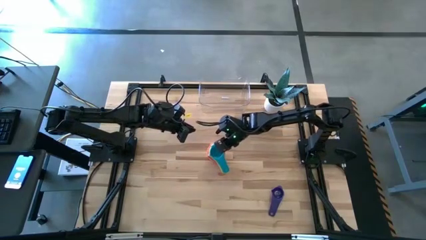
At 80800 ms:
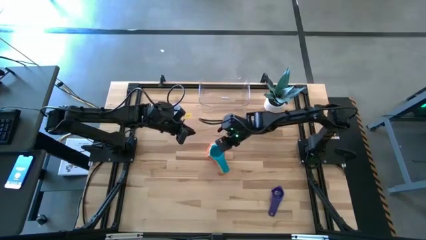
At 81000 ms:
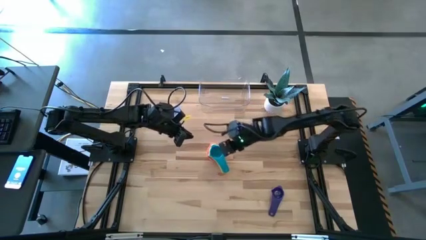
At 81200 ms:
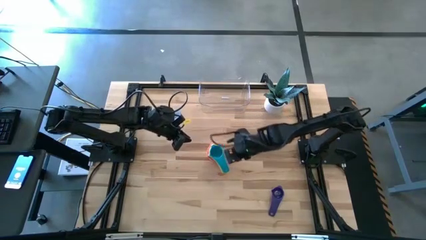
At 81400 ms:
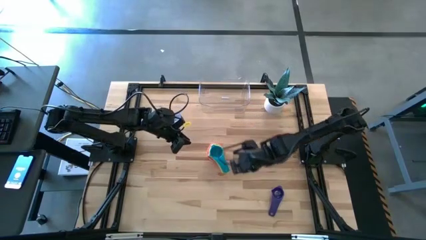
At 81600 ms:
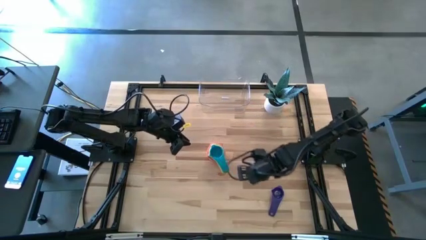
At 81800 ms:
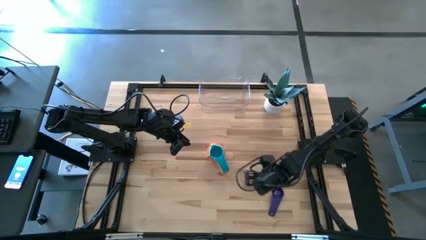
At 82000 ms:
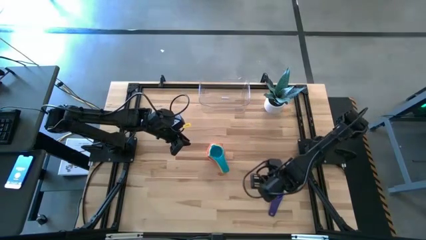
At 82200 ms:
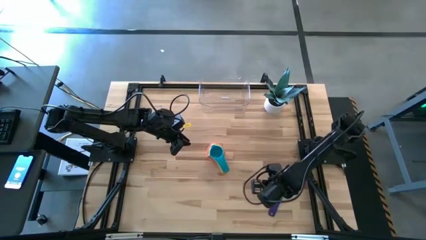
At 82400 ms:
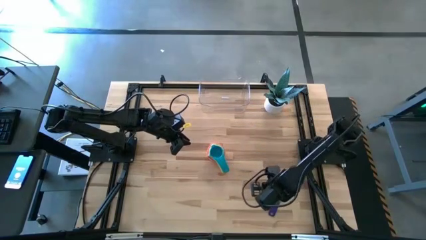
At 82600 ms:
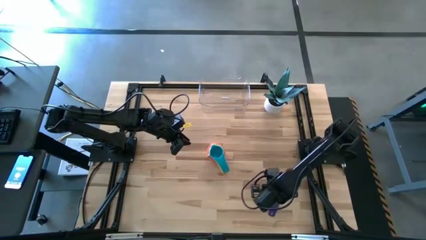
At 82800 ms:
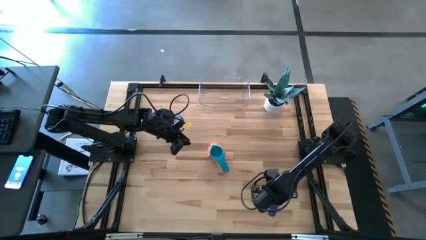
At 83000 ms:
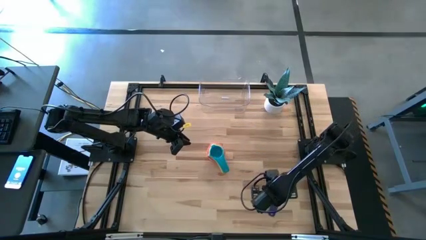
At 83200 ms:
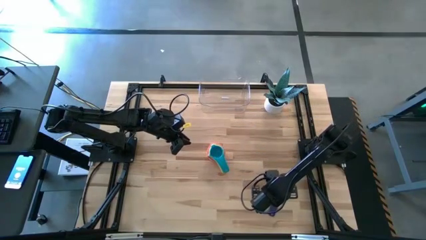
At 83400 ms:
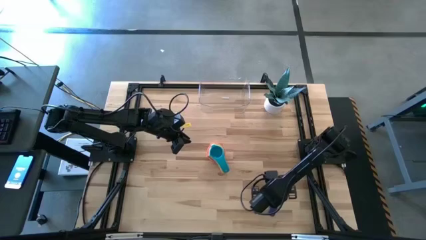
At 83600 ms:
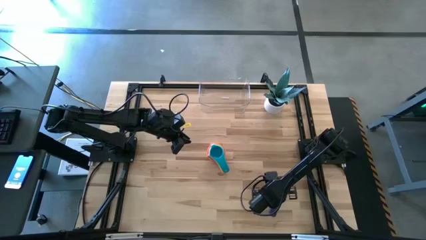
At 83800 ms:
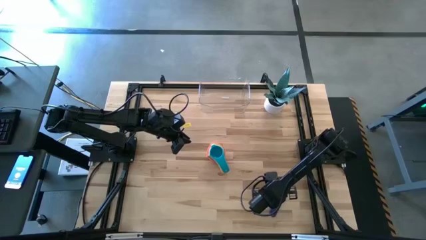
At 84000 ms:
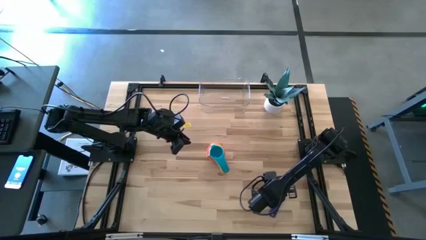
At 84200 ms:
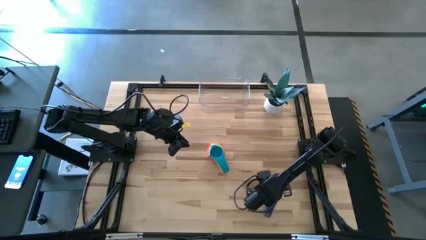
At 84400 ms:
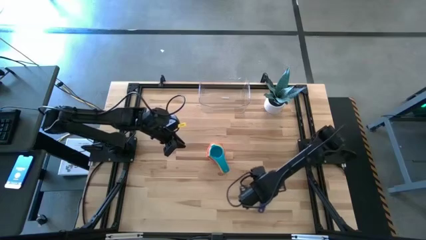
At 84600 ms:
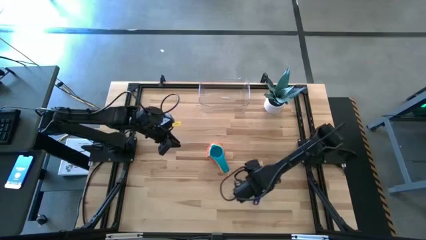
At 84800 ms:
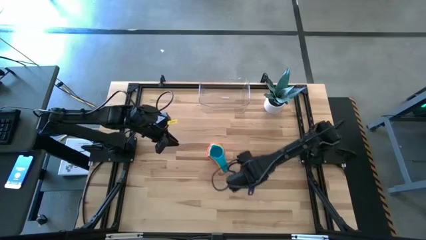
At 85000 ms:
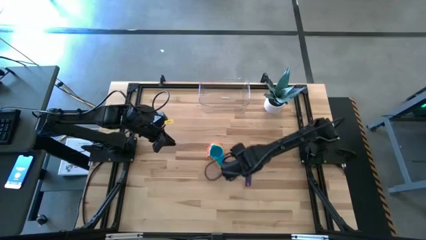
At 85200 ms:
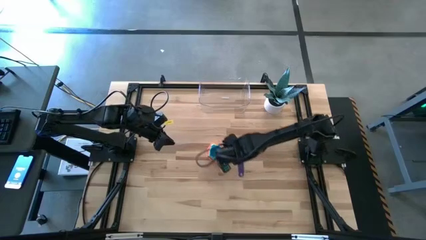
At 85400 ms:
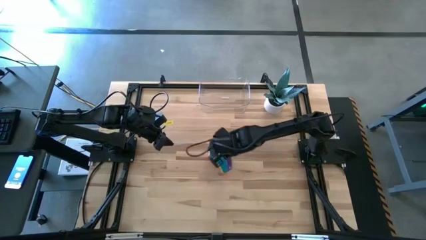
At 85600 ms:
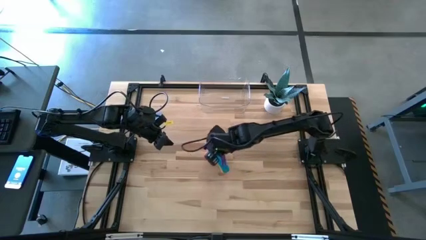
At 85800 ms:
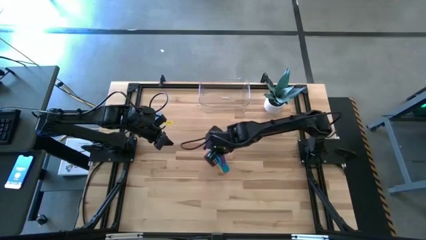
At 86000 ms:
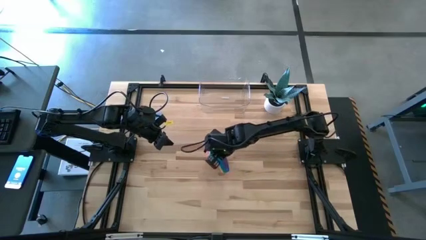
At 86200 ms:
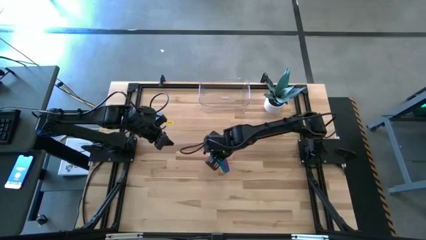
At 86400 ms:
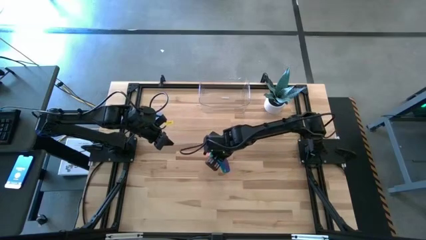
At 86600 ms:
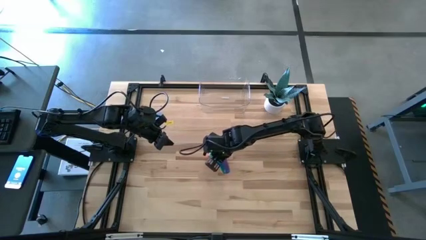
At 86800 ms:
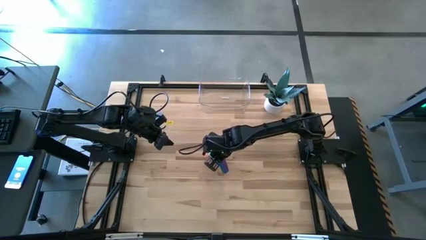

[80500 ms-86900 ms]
Task: Nest measuring cups in basket
Stack the purple measuring on the top of the light blue measuring cup

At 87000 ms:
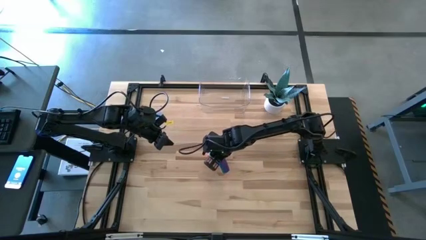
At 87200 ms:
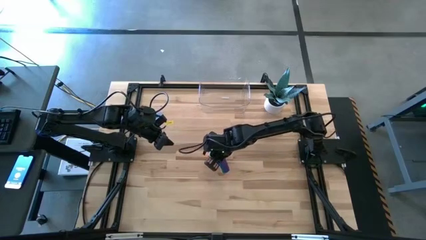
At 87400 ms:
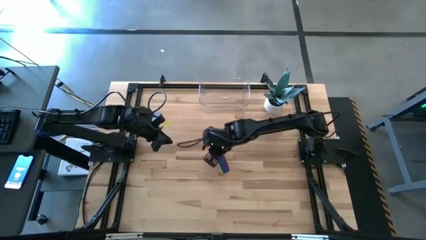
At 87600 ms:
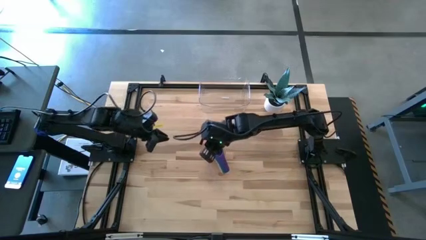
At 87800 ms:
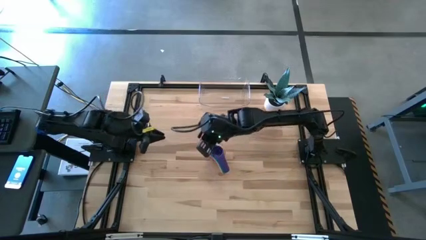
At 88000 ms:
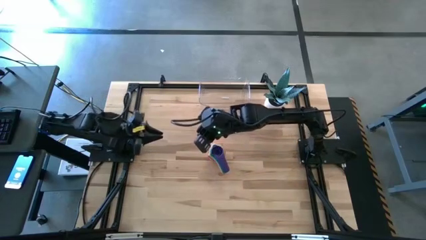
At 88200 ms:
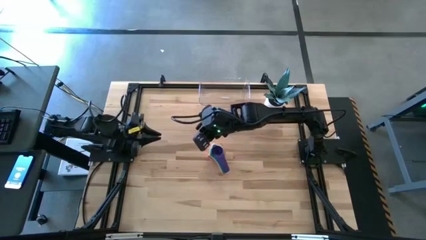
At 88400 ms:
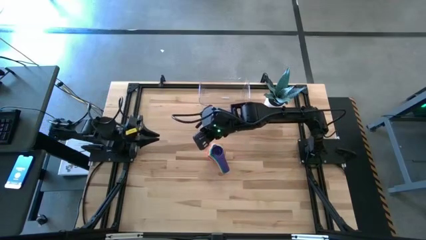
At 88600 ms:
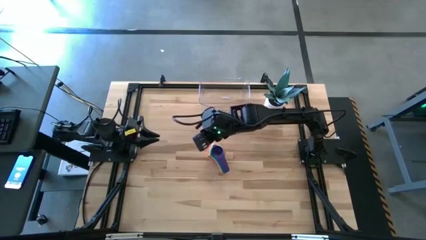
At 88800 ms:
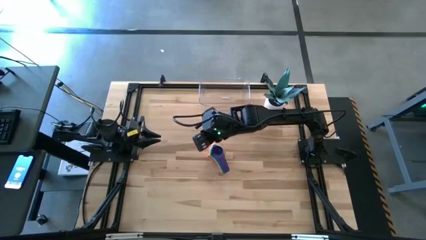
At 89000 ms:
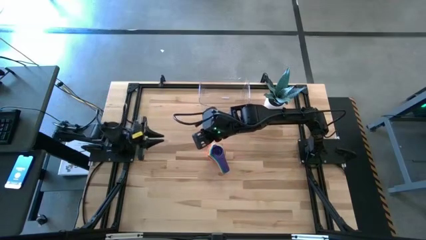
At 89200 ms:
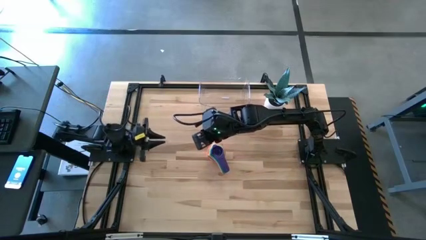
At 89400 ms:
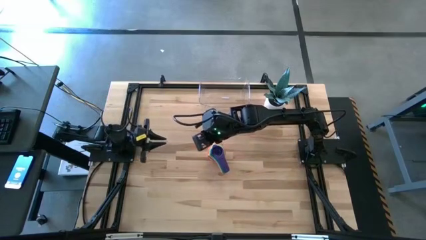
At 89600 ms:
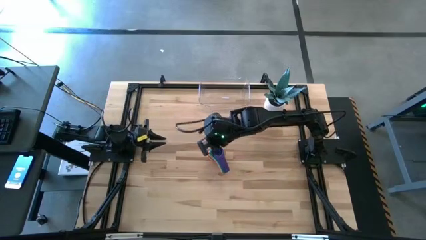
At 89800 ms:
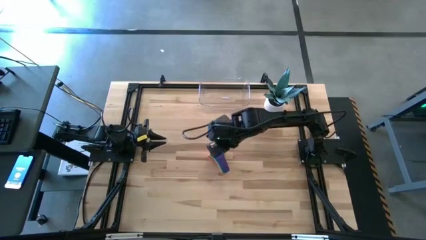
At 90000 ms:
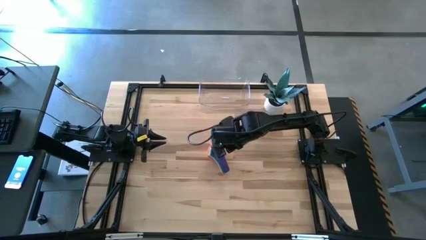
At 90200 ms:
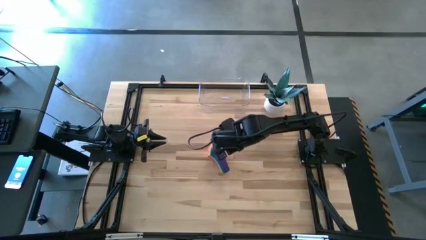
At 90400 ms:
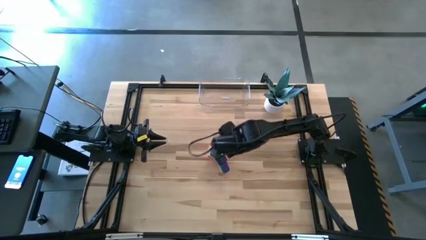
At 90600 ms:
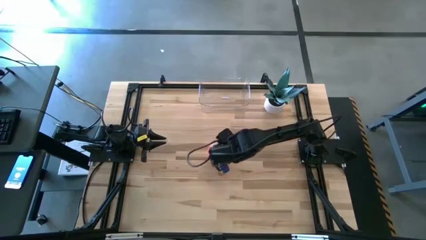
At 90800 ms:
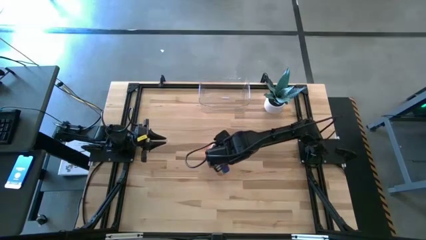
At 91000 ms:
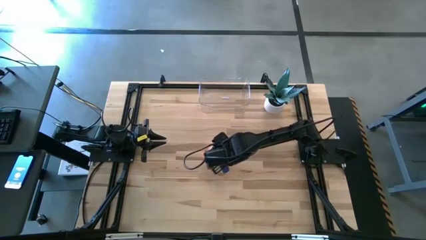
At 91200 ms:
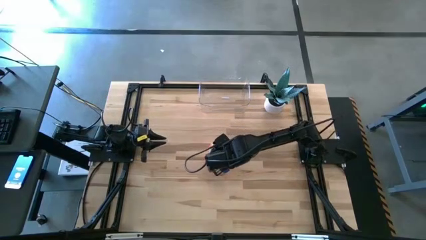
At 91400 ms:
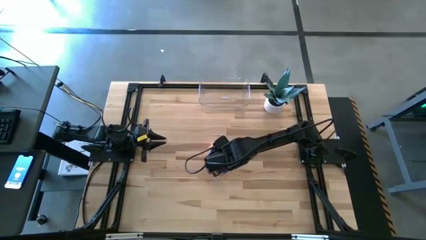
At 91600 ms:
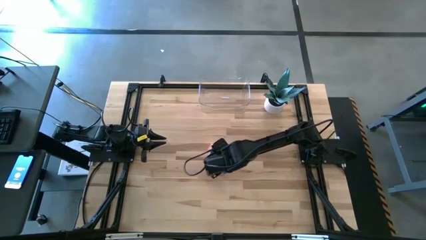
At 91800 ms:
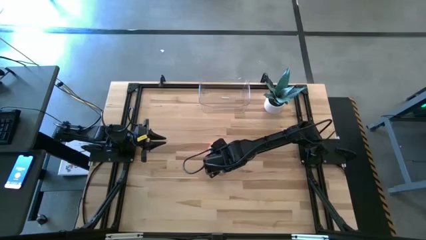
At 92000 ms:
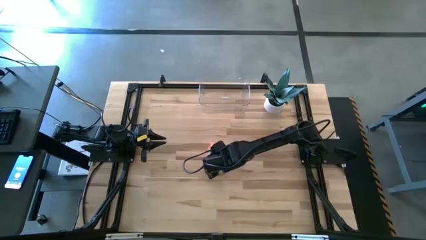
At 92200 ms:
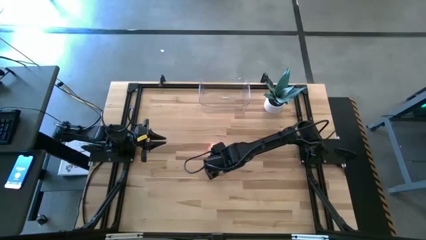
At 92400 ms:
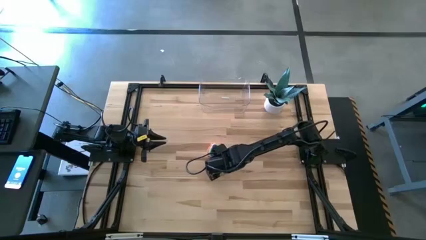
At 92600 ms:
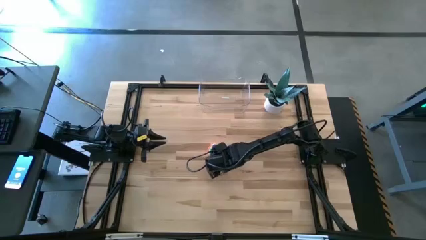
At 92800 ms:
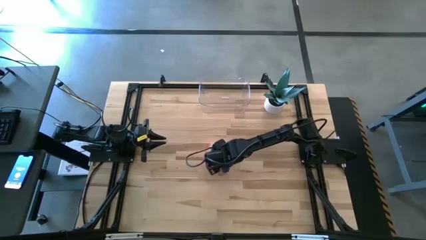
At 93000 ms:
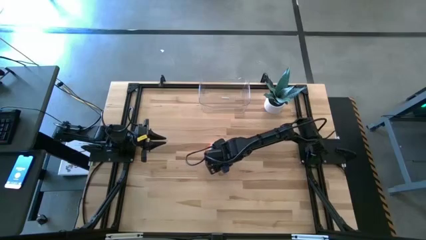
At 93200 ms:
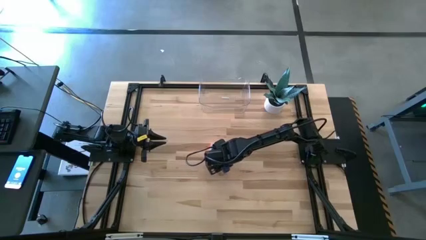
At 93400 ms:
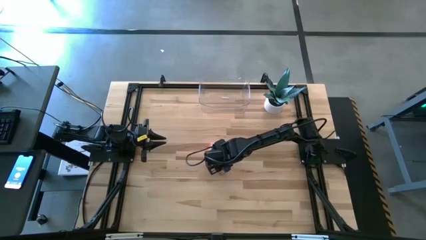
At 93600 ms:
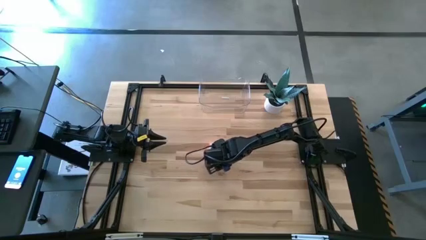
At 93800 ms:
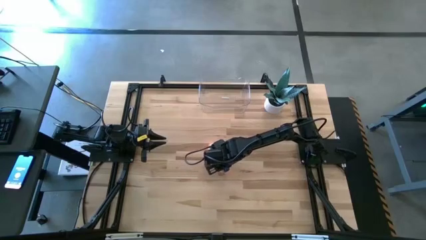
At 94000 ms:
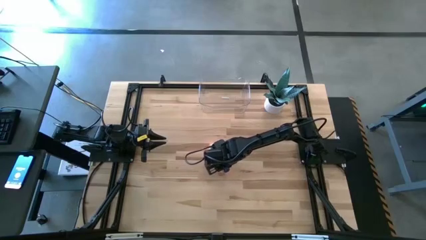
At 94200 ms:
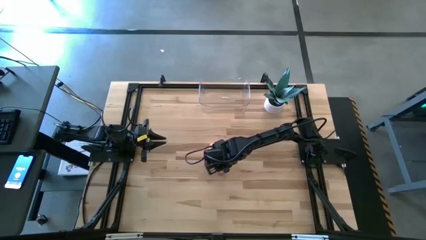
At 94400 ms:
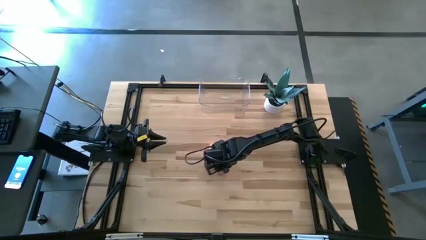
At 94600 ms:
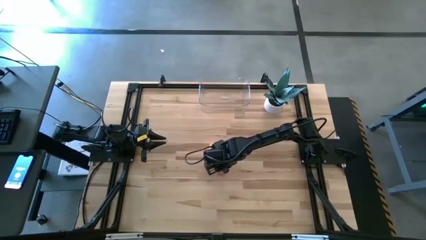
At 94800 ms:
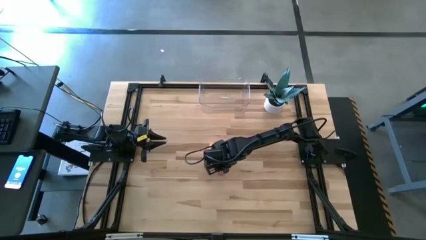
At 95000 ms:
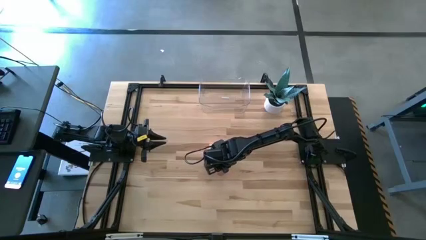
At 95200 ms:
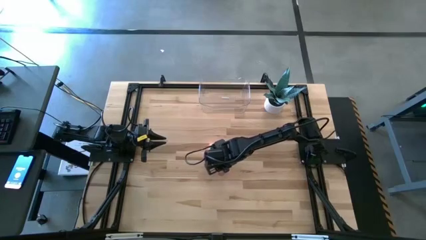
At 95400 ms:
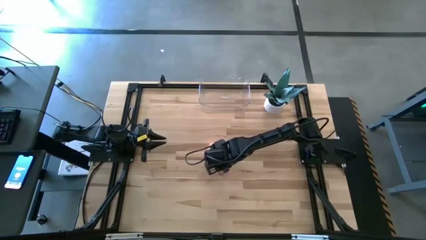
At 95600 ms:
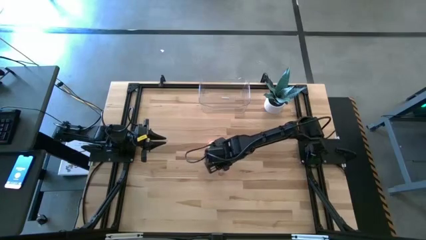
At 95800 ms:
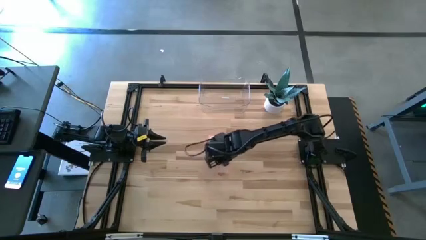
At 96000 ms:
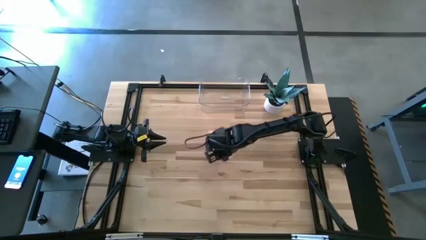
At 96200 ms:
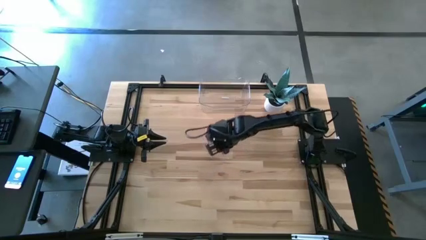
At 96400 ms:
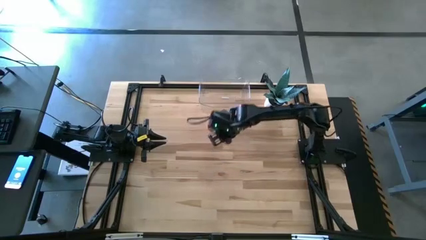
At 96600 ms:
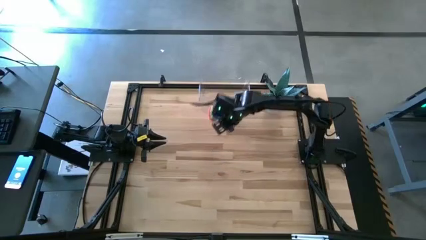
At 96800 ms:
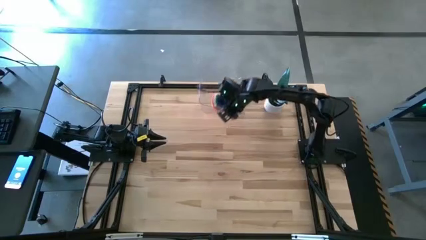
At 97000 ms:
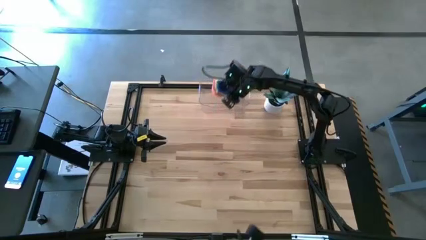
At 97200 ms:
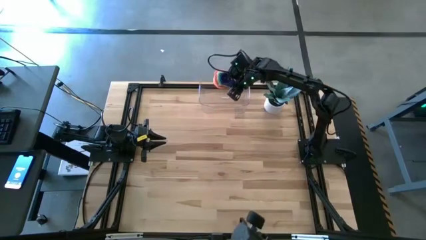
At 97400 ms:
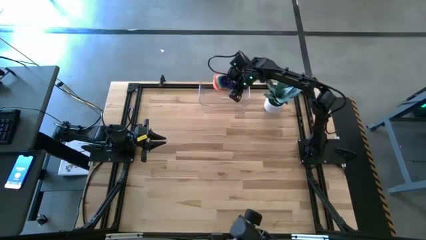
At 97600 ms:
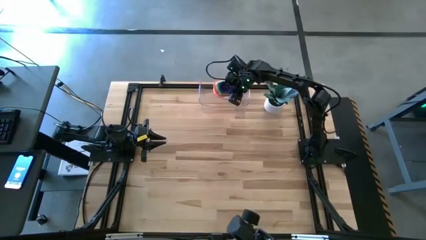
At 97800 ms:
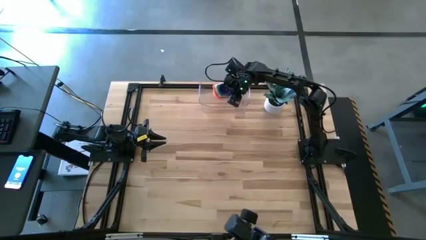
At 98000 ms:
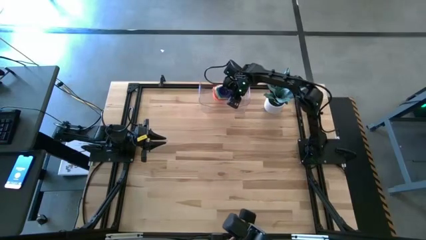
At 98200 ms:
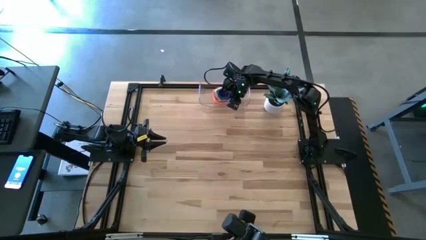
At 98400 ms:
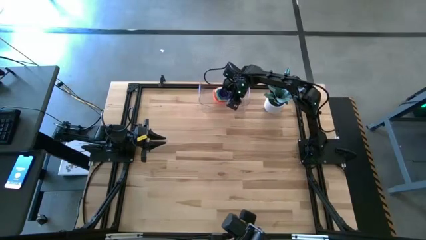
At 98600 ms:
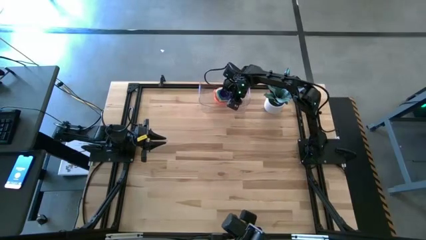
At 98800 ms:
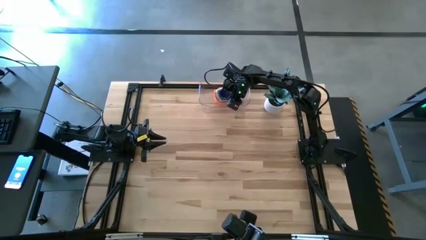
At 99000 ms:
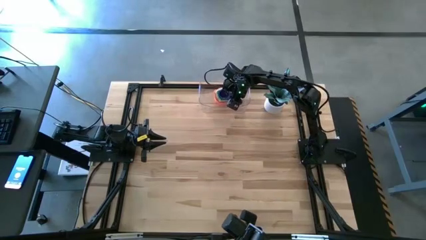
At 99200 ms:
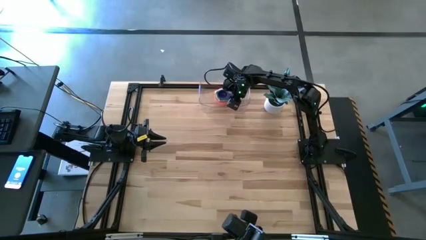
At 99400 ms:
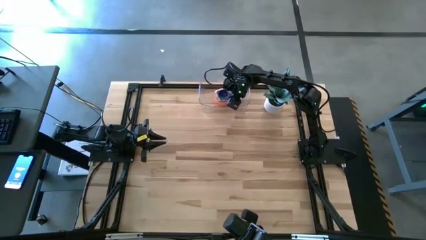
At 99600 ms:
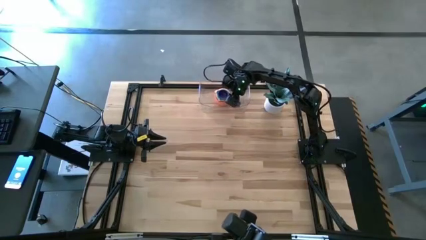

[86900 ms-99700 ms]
Put the stacked measuring cups into the transparent bin
